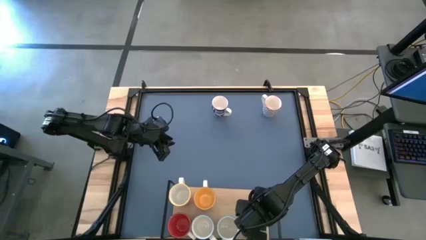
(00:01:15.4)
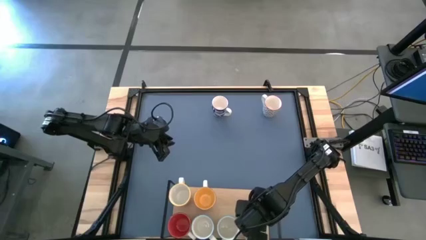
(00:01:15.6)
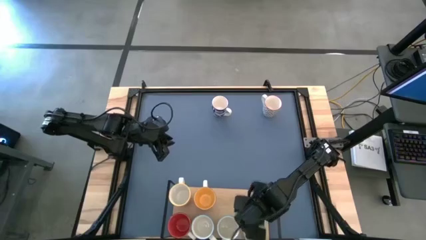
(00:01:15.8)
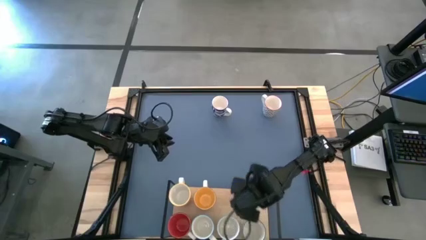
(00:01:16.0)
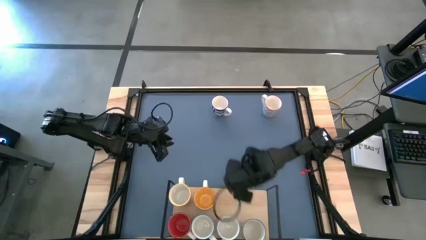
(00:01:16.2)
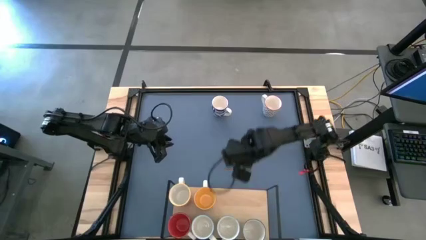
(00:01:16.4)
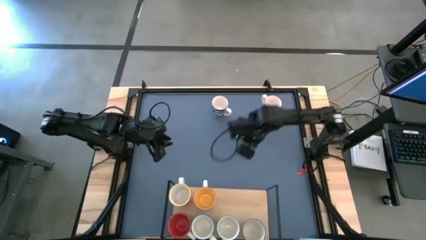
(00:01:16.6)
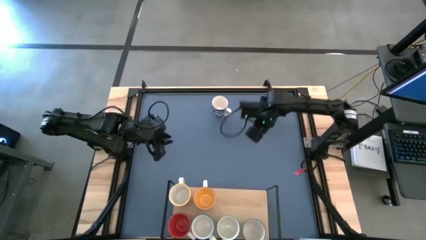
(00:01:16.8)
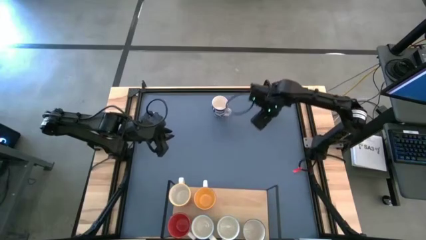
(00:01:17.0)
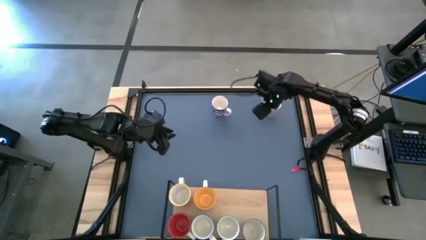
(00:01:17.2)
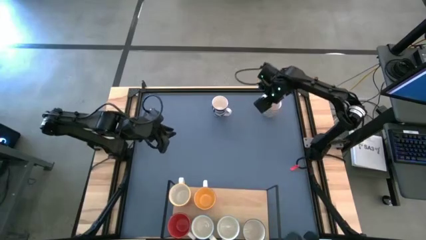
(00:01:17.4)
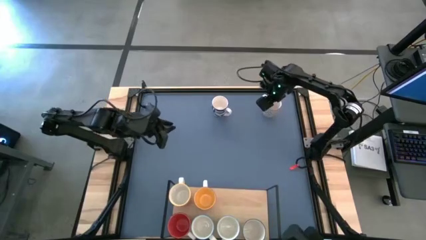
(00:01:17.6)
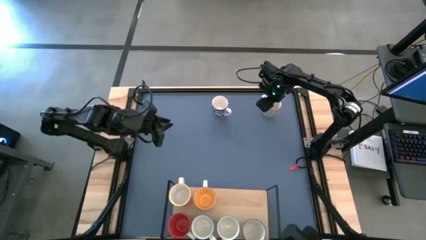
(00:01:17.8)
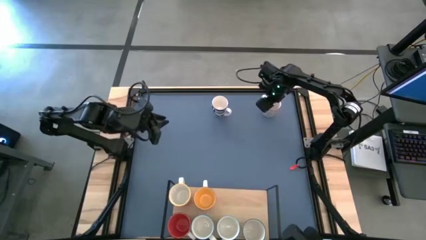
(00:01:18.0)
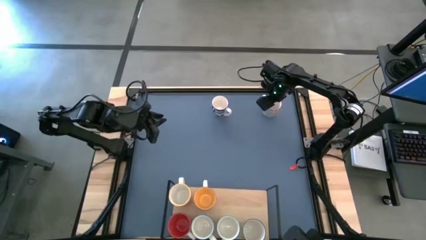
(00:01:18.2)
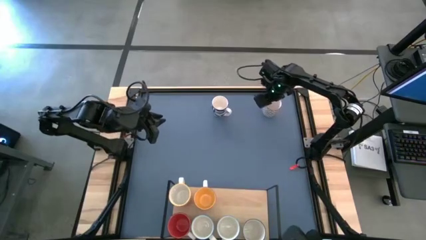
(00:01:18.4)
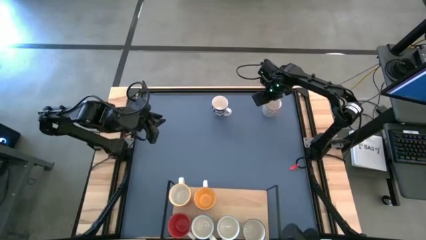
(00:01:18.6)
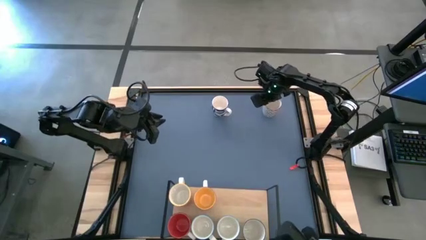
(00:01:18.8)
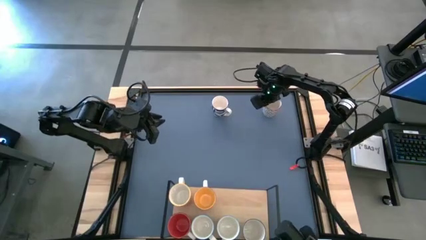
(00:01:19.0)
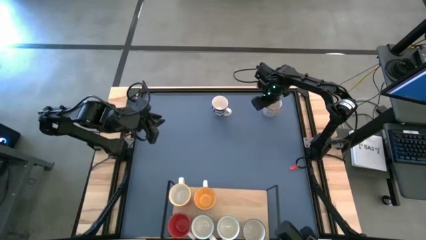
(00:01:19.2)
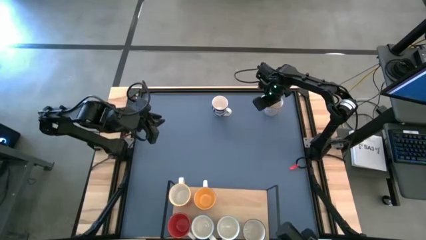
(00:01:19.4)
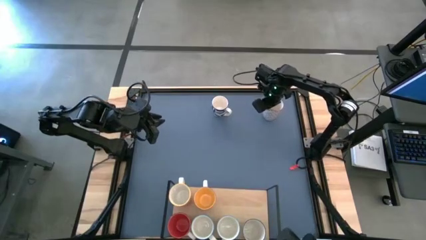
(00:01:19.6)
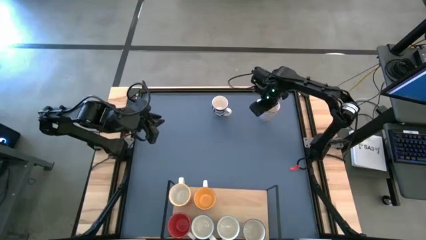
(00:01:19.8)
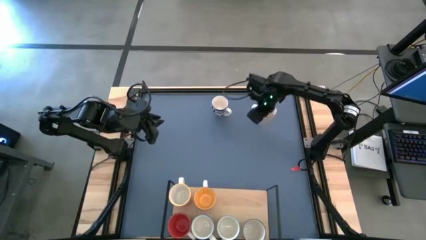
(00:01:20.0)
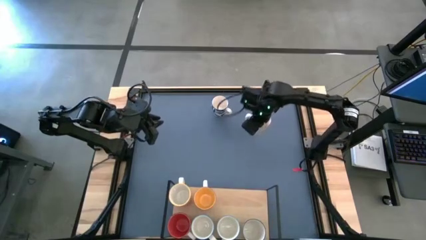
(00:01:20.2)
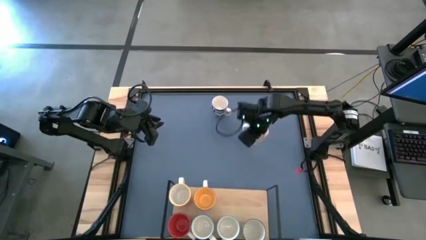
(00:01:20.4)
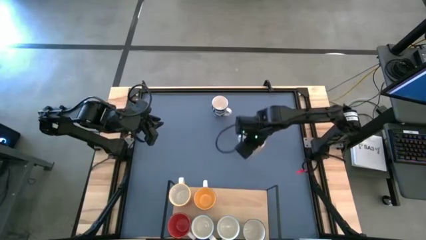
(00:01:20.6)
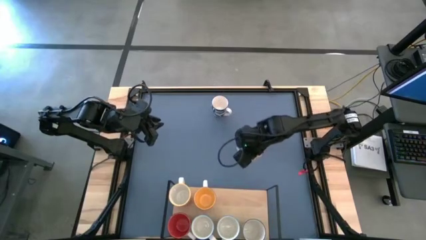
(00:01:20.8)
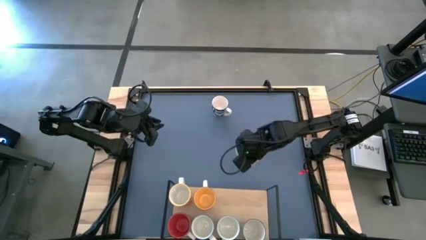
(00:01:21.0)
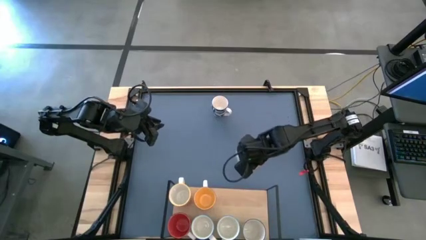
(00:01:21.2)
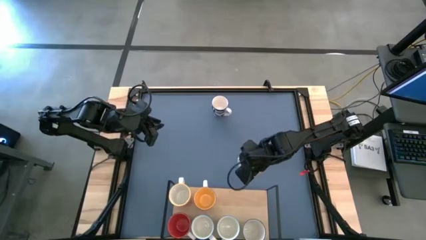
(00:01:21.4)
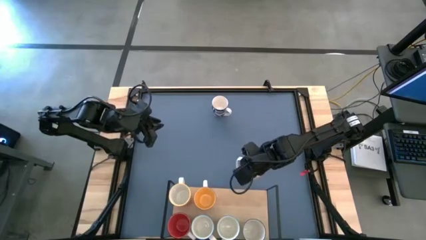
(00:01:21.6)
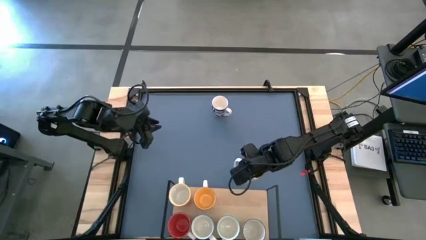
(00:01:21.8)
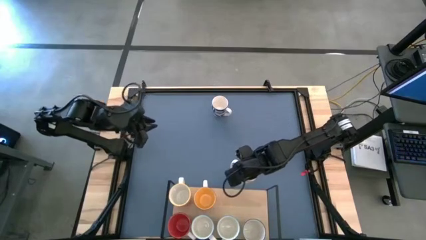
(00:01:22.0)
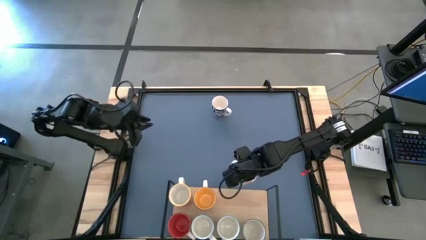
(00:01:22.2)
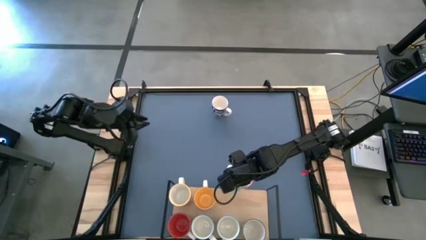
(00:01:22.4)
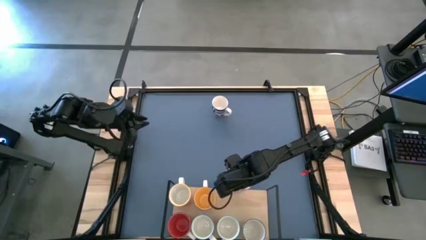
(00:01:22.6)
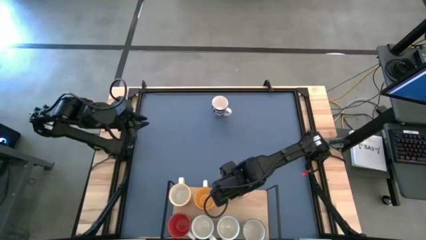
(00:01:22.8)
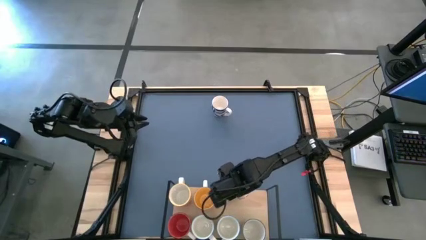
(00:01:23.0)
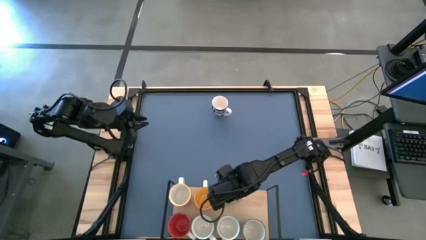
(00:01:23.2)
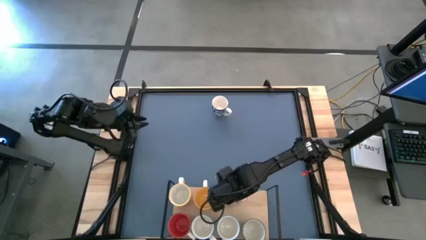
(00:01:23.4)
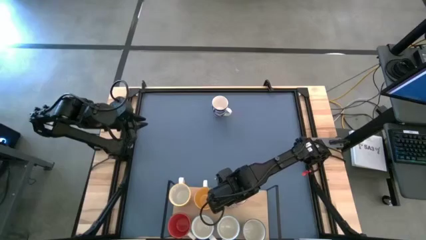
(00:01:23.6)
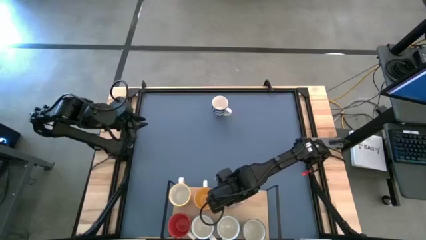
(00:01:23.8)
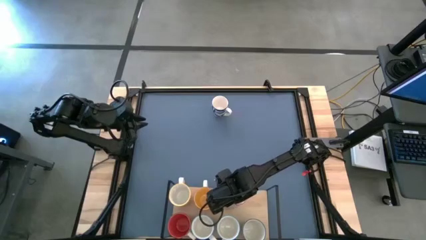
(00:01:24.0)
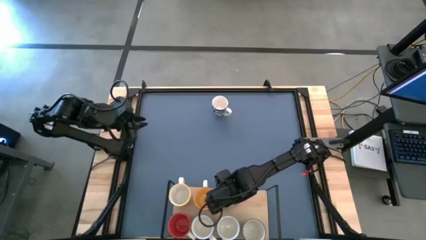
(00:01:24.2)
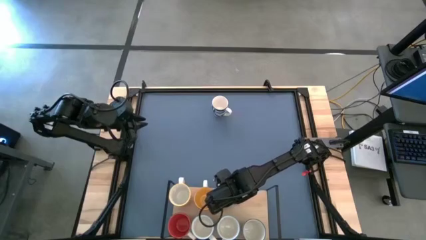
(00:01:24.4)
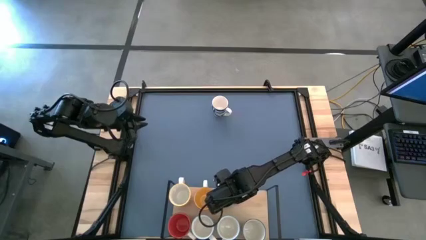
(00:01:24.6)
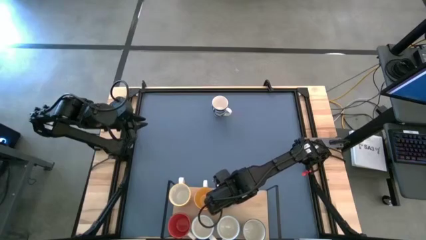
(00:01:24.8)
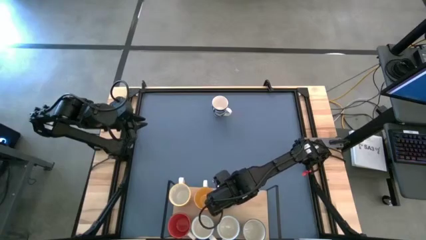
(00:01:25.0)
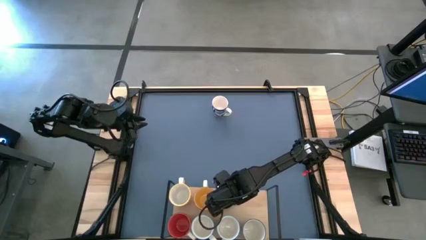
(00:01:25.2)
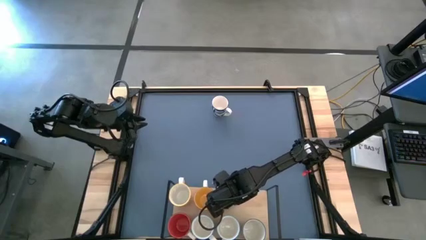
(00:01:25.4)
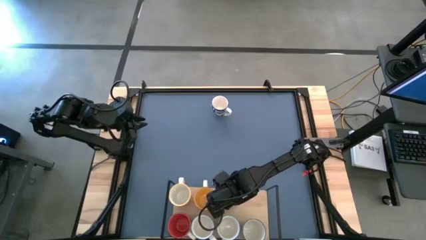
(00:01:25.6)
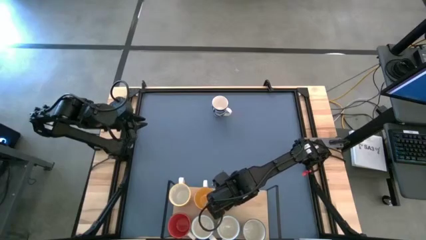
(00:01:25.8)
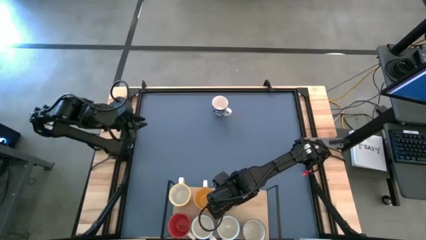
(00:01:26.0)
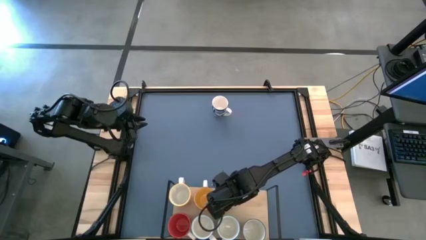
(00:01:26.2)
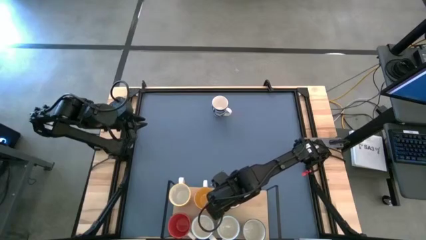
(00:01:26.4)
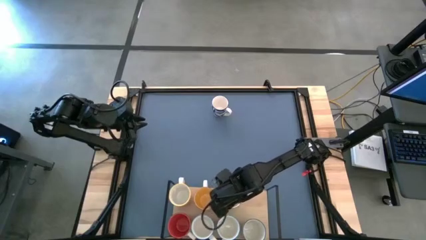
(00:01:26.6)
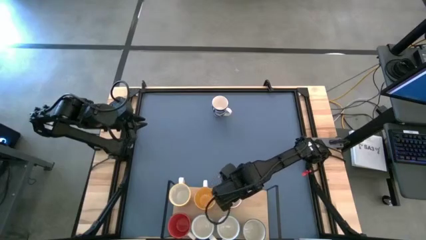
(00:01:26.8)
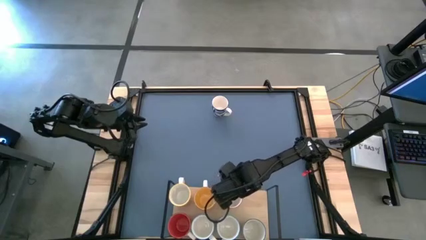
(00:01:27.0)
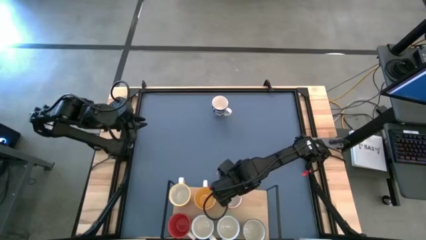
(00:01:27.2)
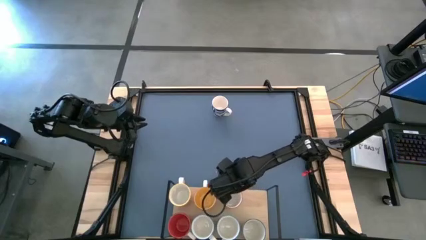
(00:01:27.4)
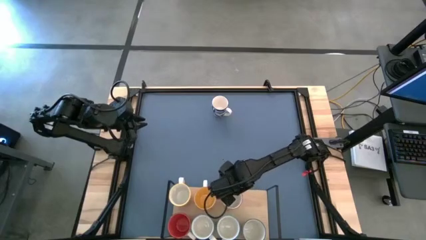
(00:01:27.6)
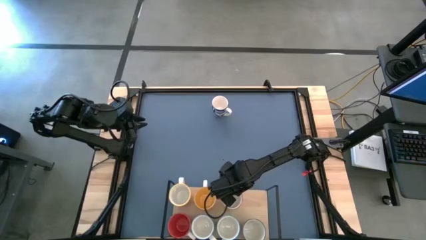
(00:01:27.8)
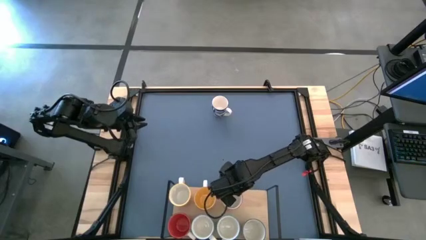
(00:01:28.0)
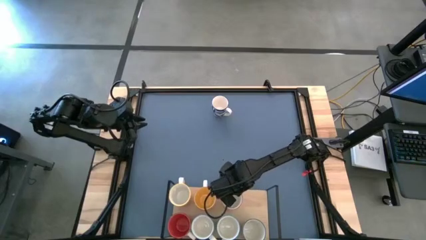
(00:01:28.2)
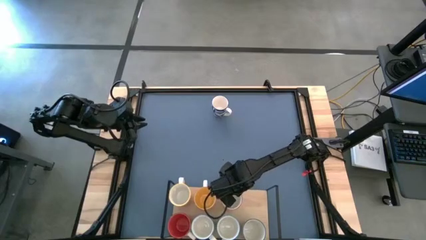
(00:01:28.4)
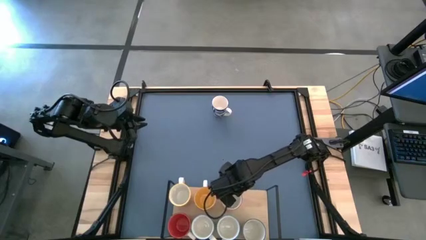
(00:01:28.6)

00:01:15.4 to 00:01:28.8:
Task: Place coffee mugs
Put the gray patterned mug on the shelf
